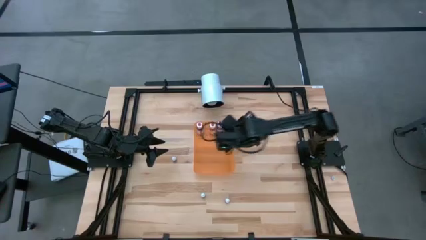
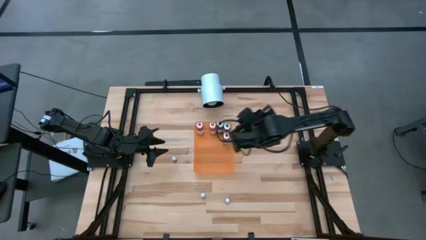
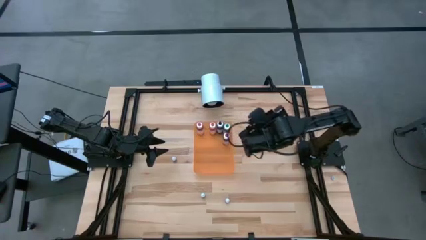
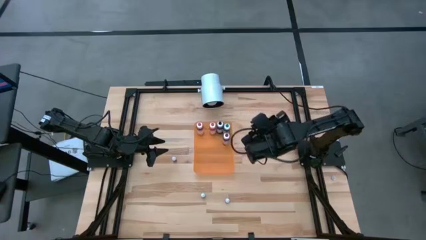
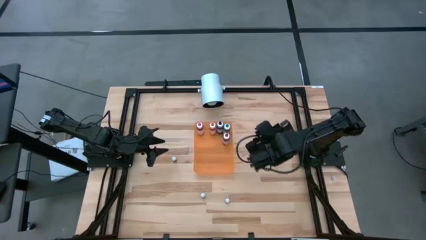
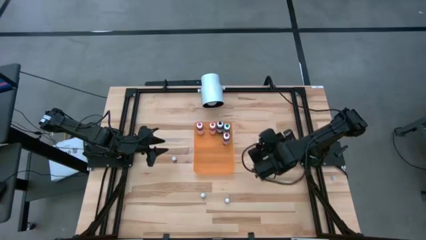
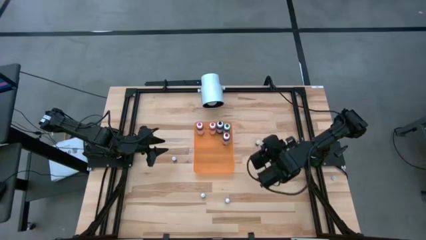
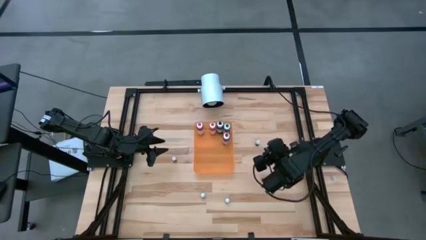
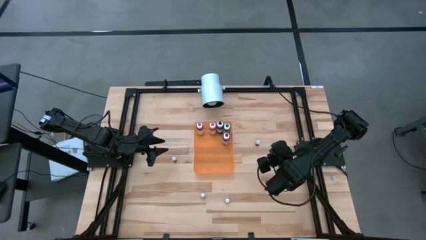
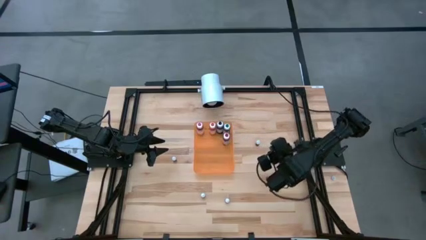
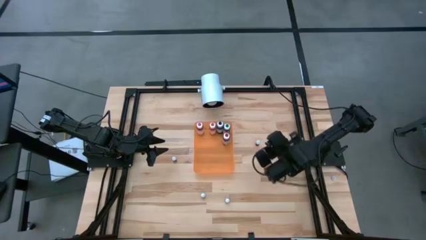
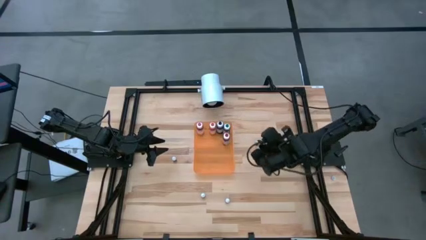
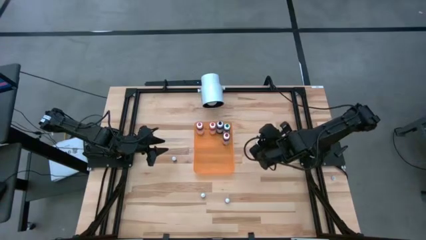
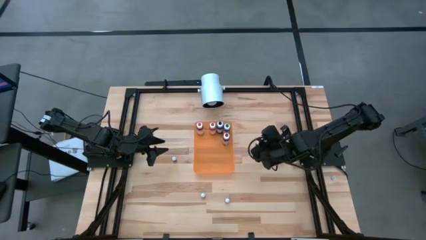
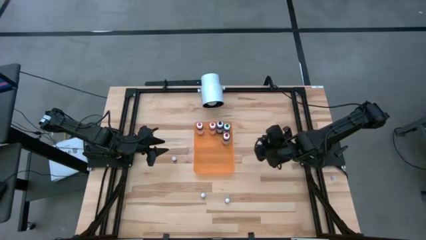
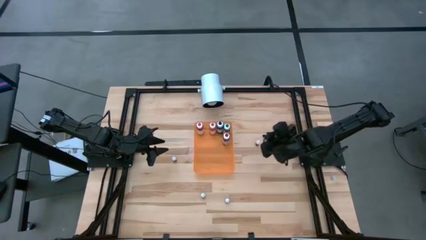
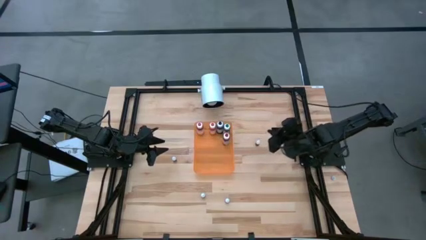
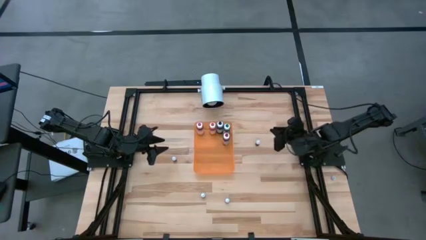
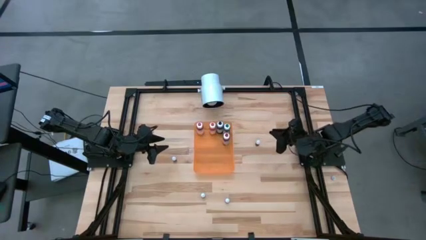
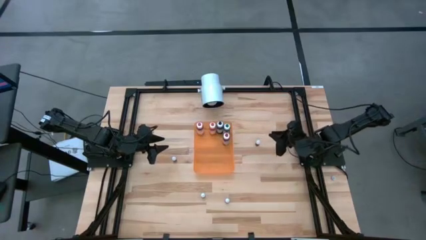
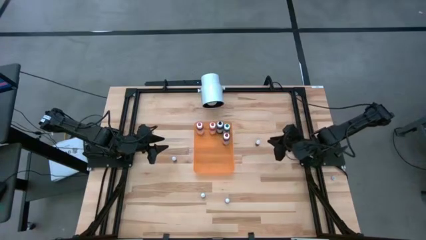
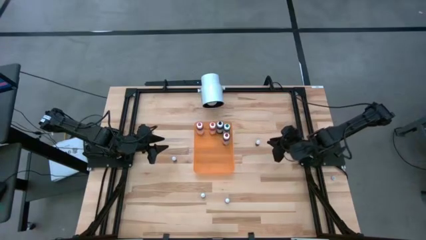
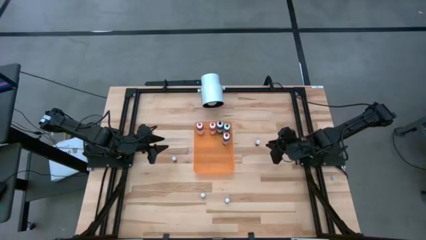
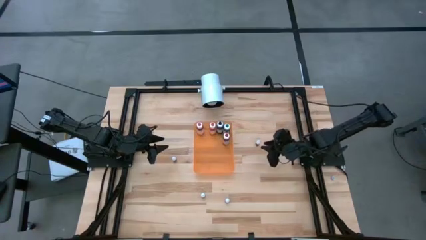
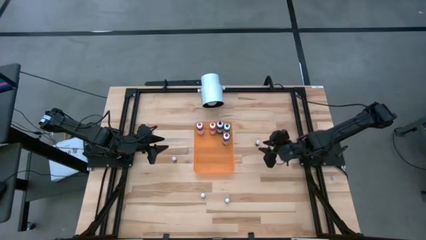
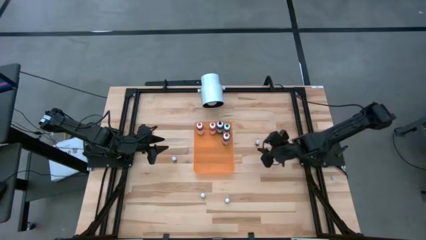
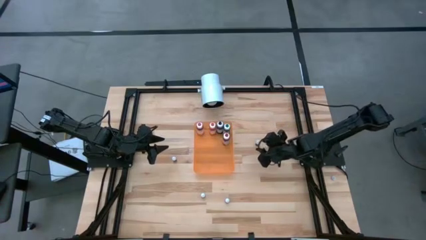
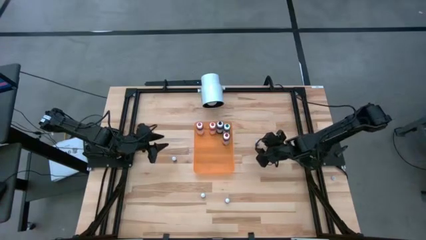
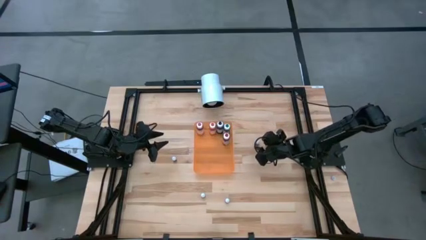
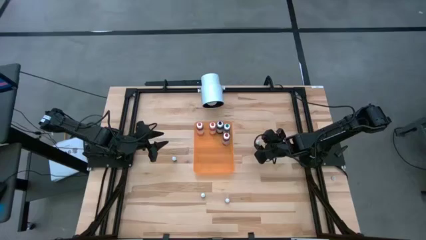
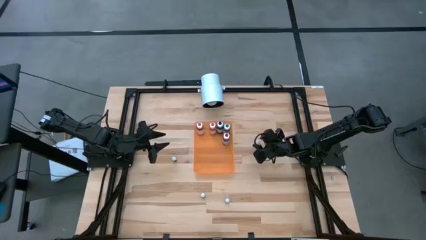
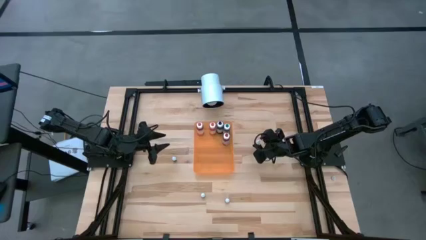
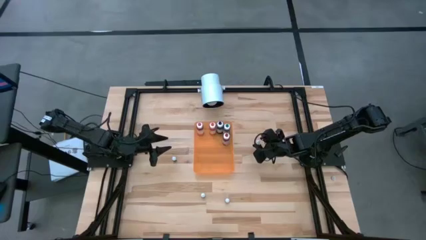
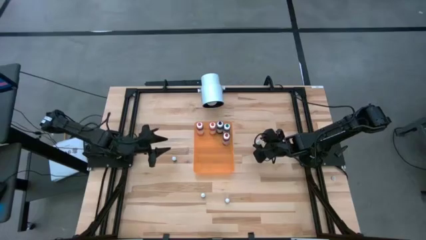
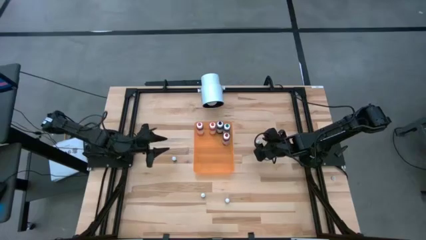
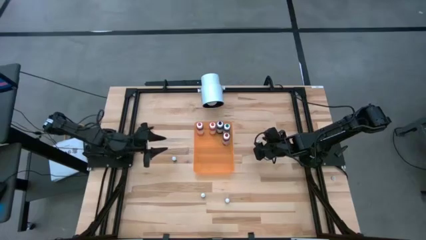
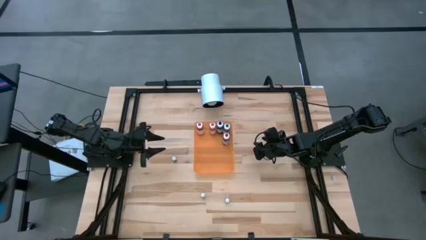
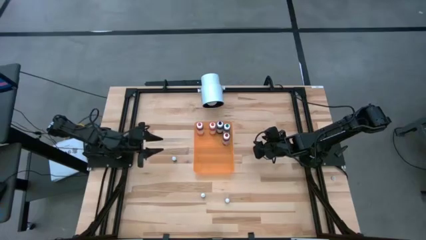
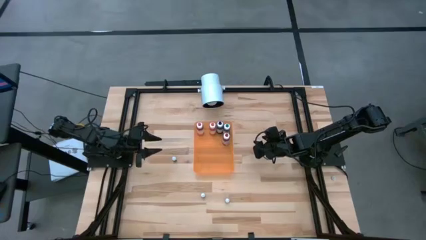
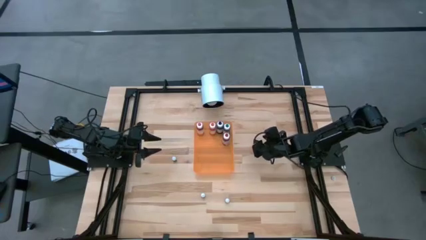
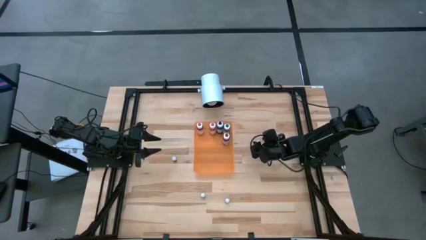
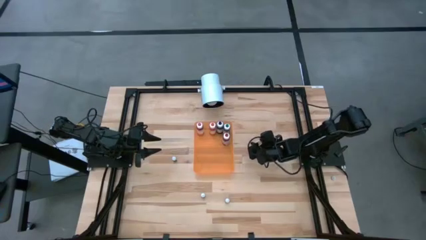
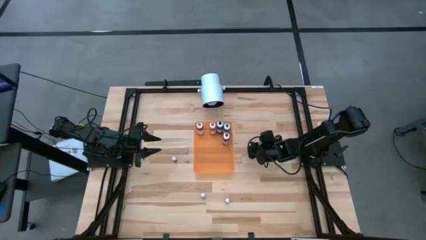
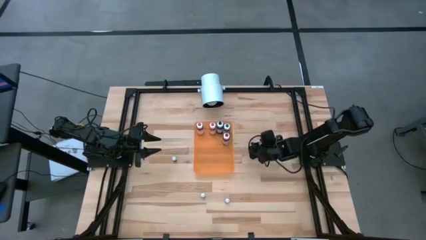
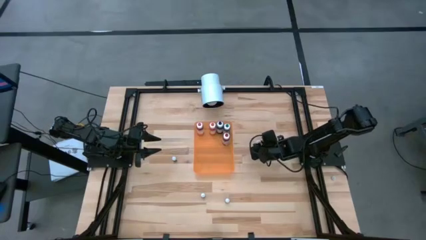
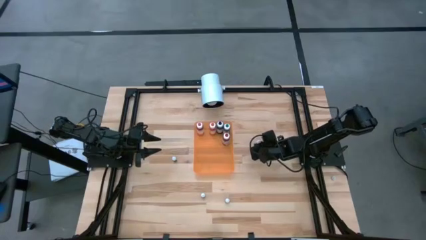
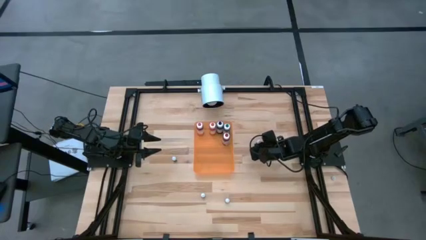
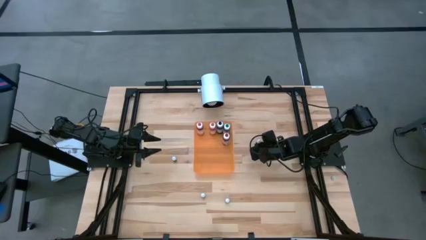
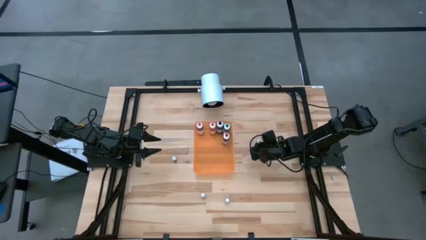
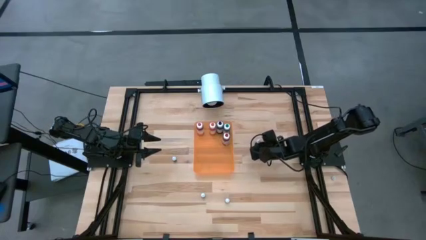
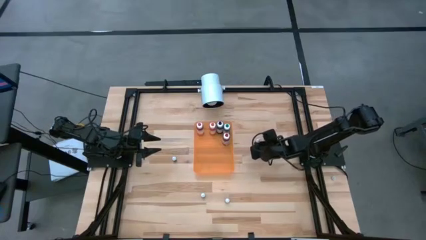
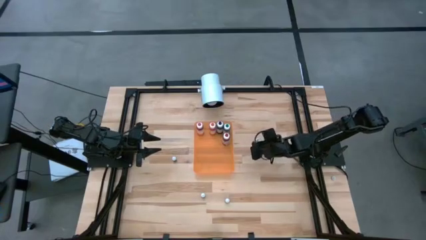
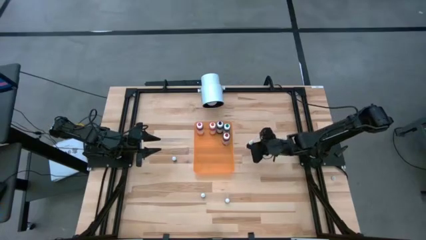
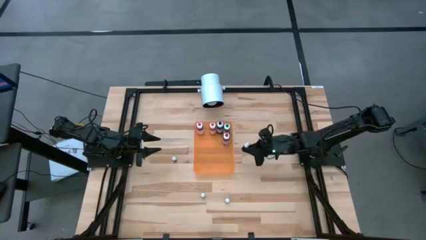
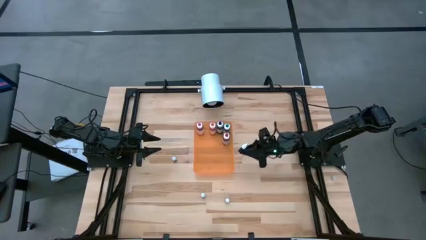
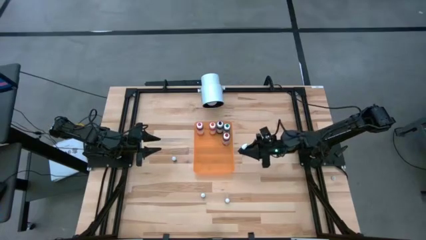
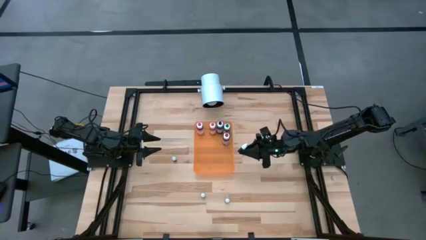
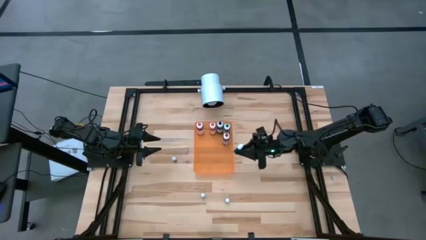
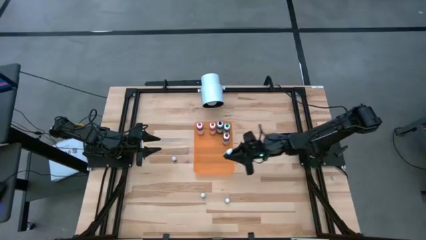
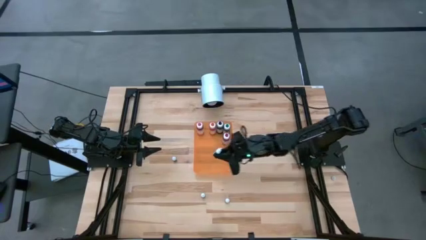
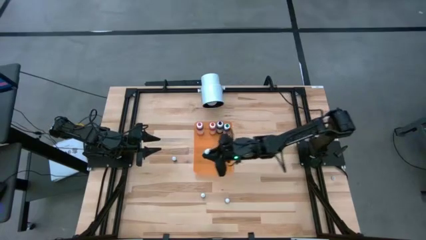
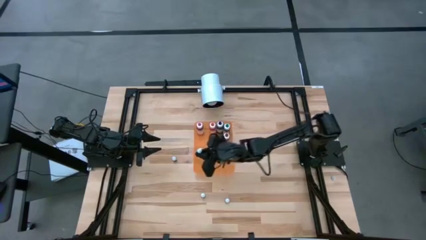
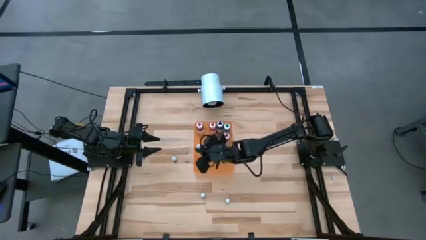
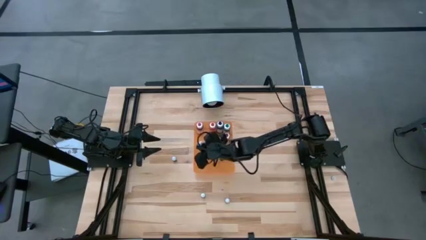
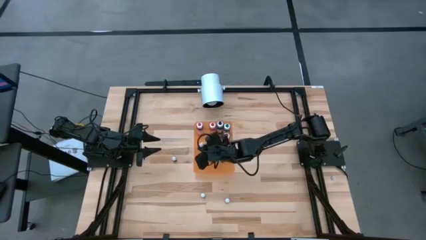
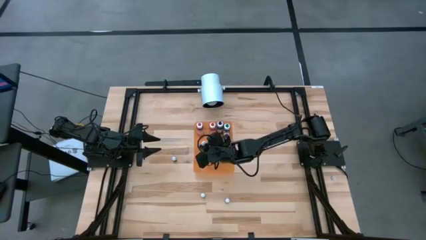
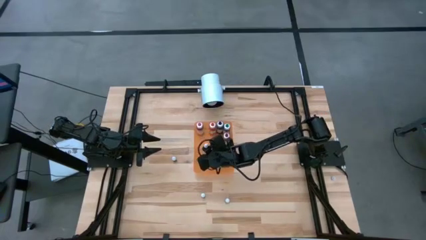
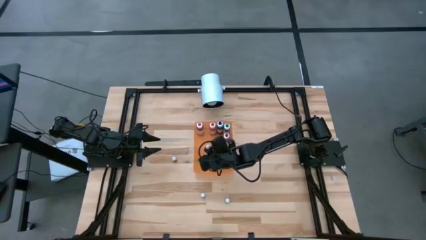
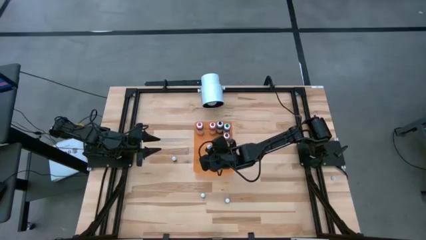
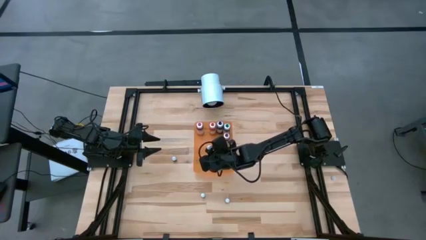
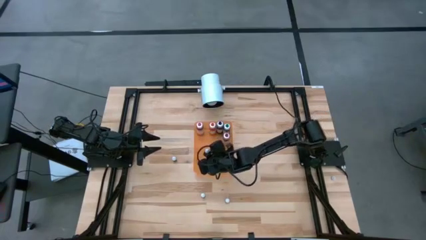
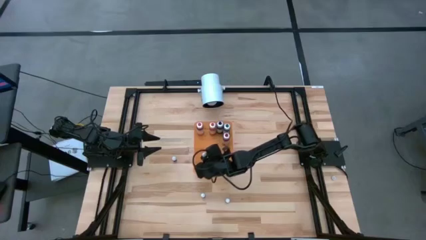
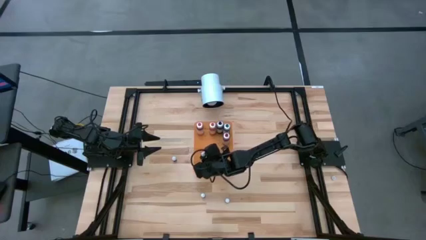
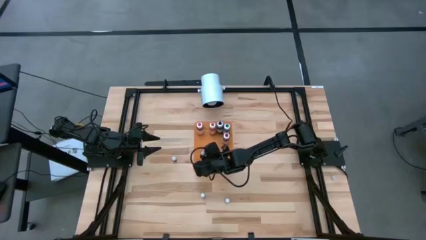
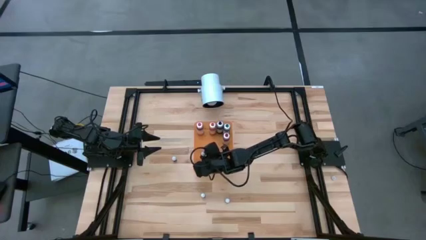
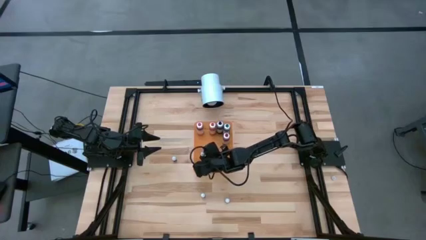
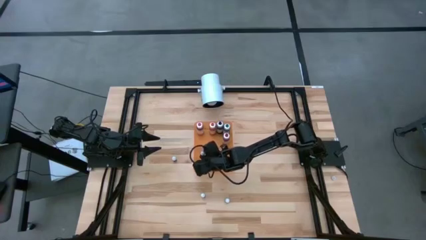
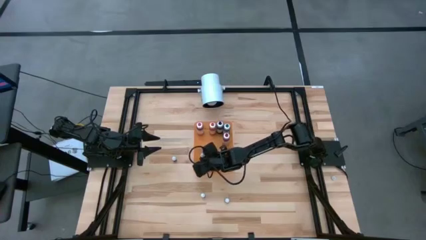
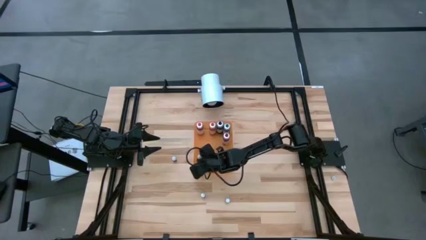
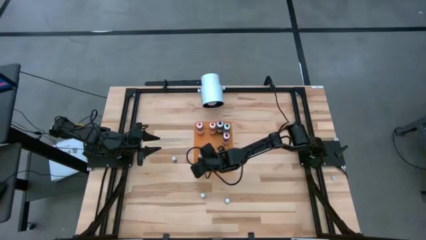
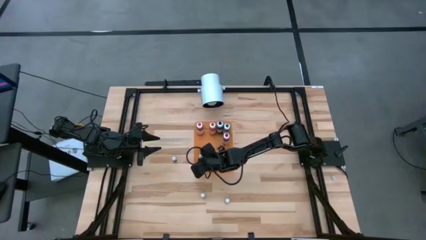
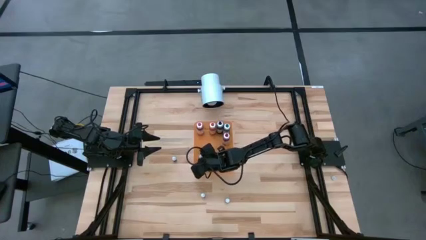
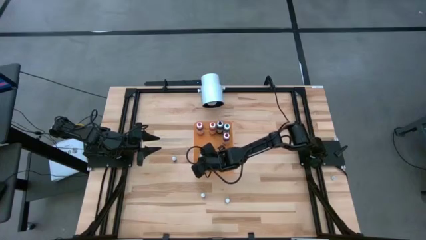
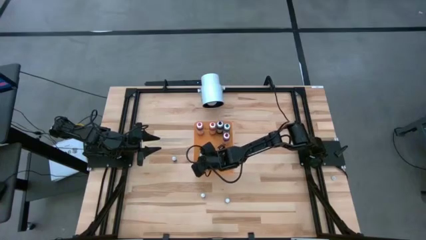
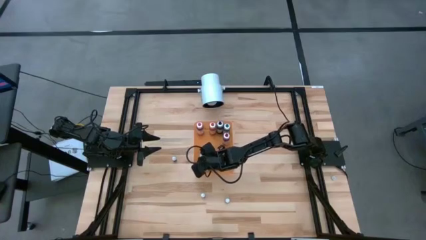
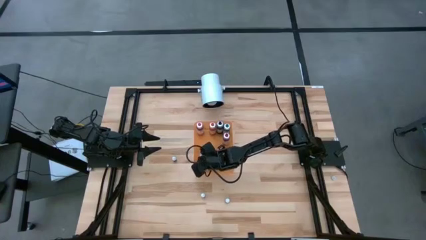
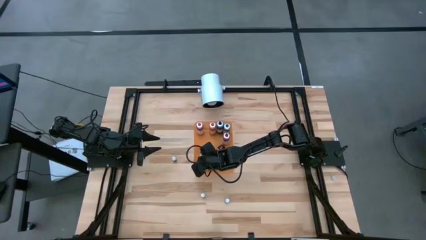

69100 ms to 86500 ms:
Task: Pick & Place food coloring
Put the small light green food coloring bottle into the bin
